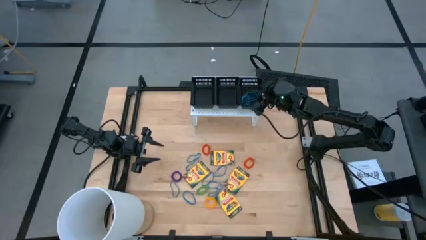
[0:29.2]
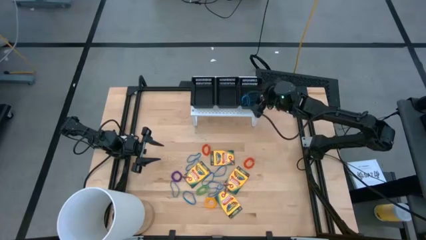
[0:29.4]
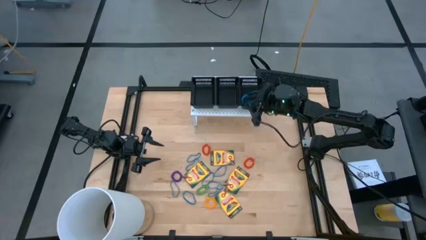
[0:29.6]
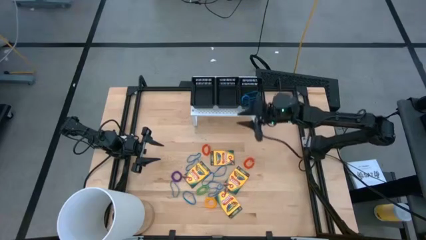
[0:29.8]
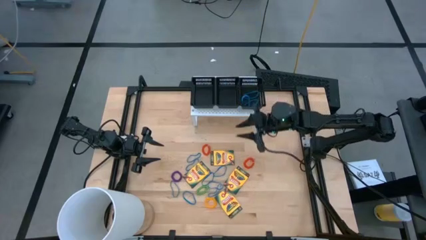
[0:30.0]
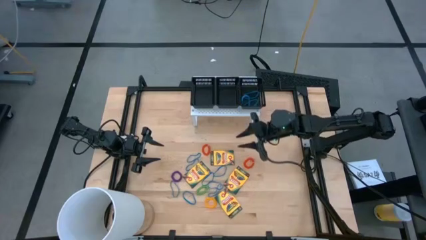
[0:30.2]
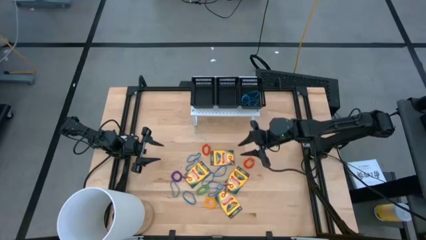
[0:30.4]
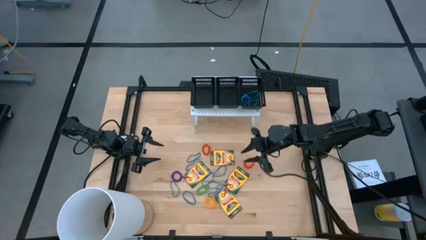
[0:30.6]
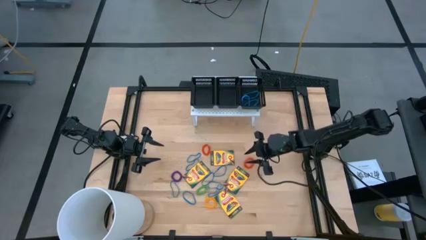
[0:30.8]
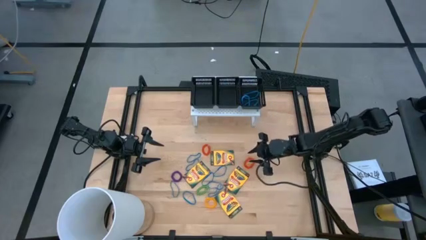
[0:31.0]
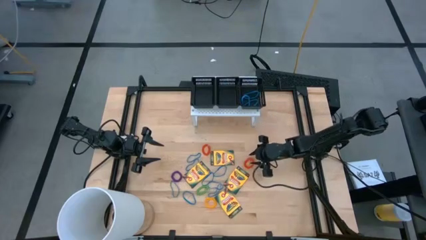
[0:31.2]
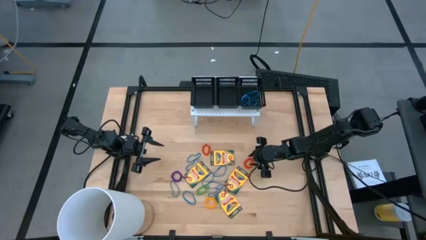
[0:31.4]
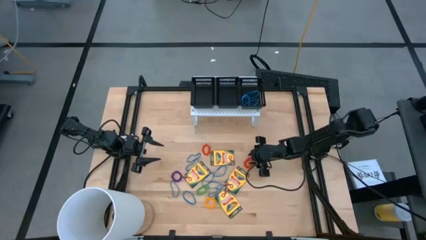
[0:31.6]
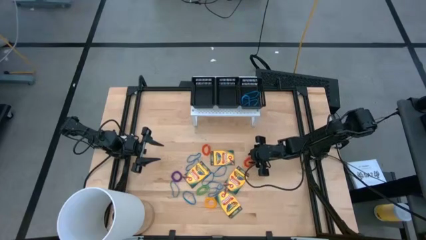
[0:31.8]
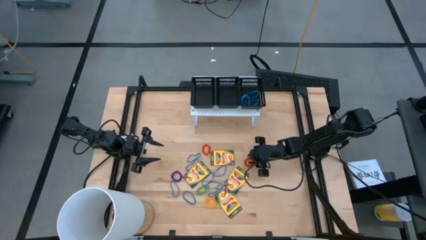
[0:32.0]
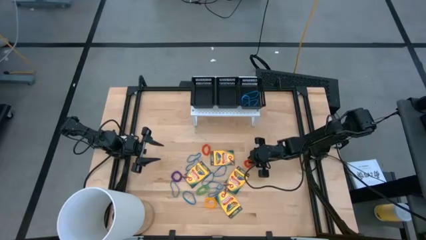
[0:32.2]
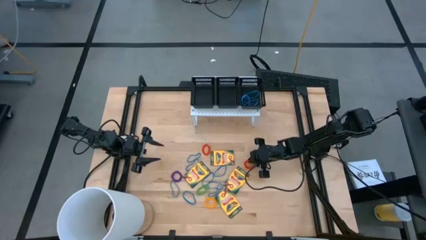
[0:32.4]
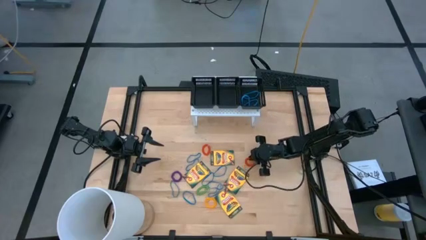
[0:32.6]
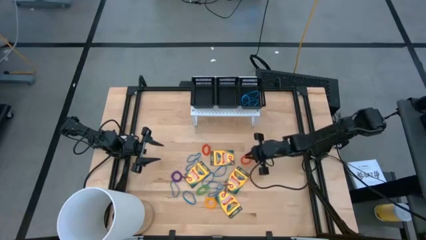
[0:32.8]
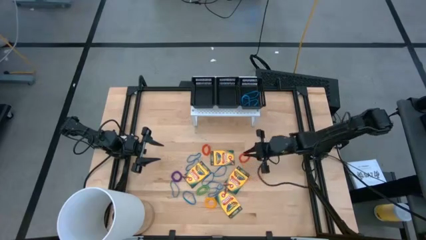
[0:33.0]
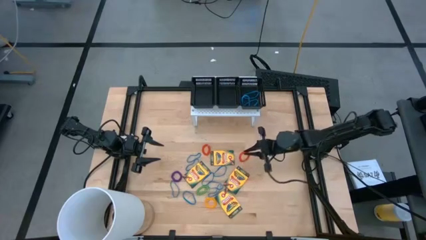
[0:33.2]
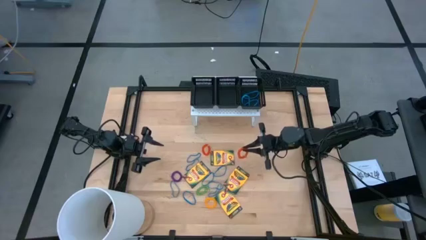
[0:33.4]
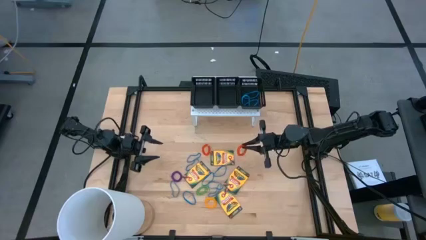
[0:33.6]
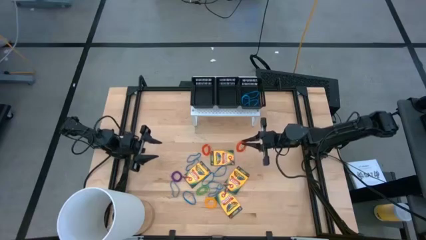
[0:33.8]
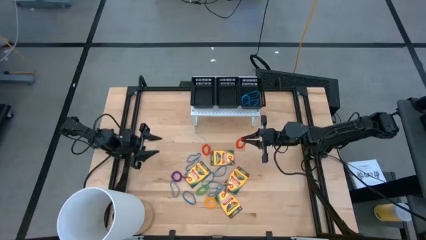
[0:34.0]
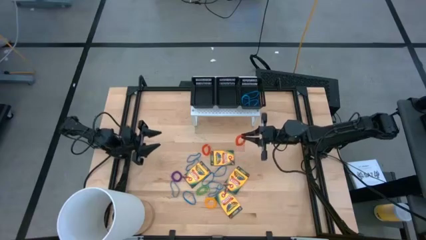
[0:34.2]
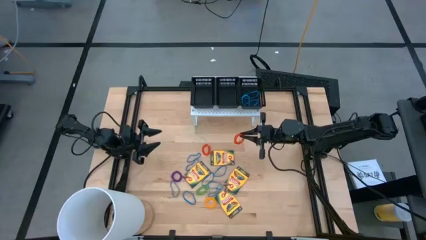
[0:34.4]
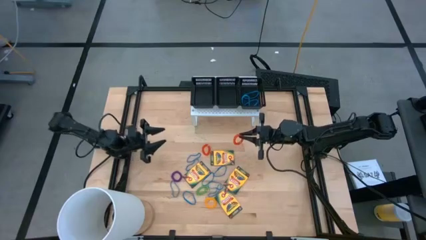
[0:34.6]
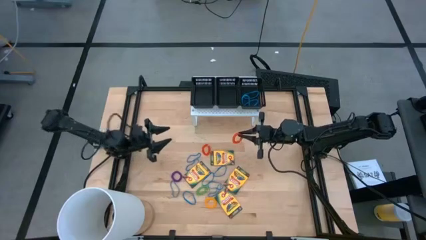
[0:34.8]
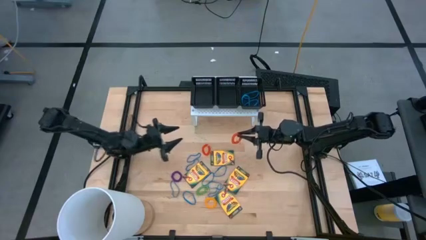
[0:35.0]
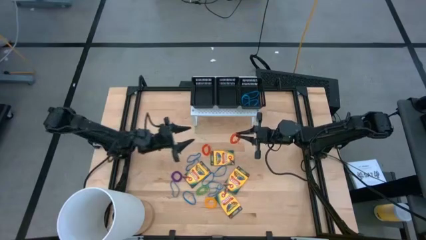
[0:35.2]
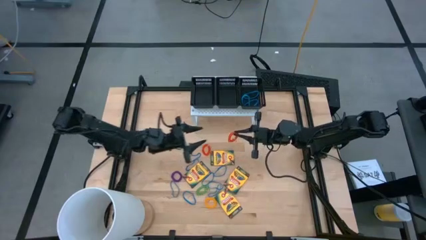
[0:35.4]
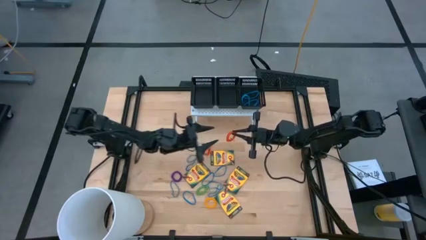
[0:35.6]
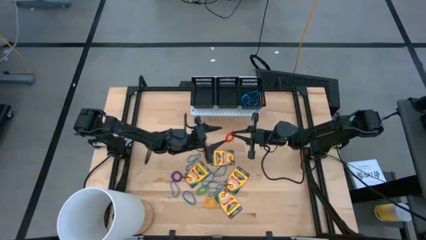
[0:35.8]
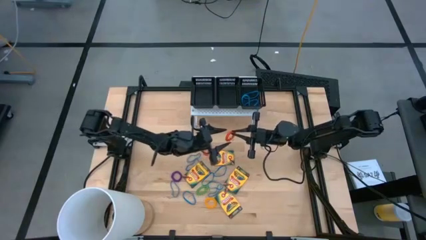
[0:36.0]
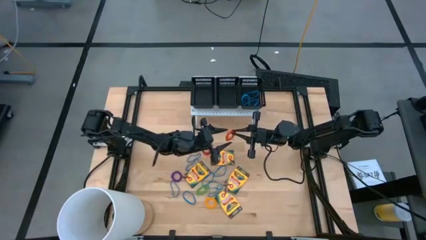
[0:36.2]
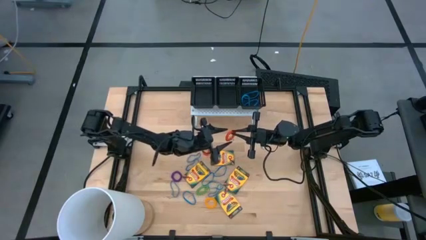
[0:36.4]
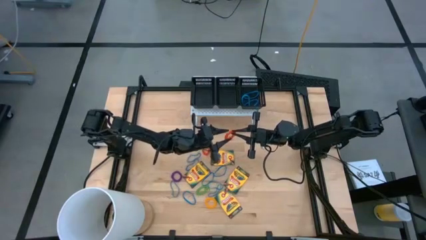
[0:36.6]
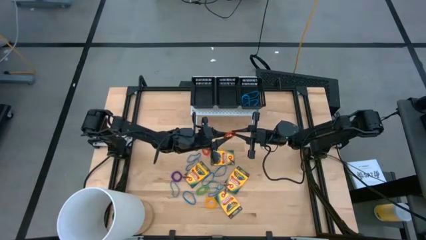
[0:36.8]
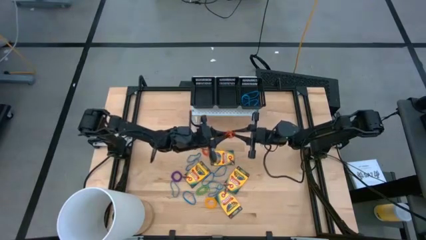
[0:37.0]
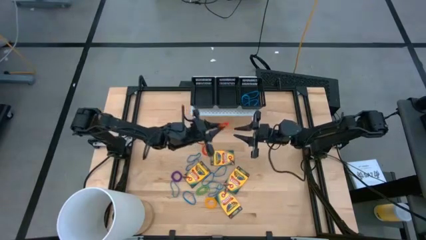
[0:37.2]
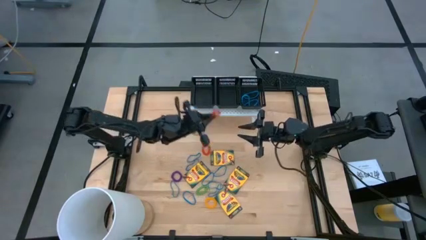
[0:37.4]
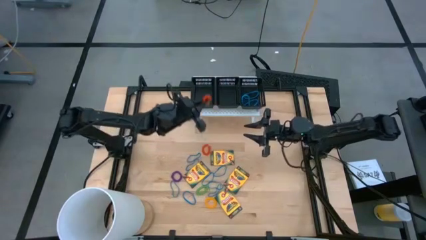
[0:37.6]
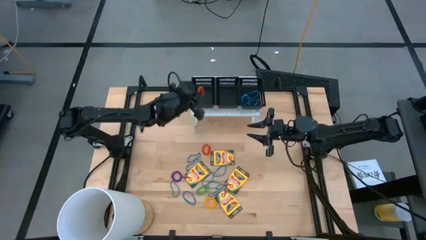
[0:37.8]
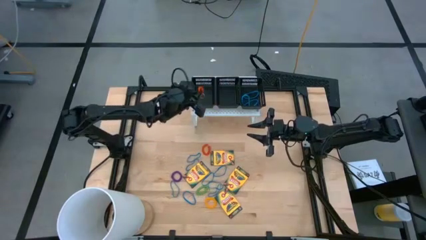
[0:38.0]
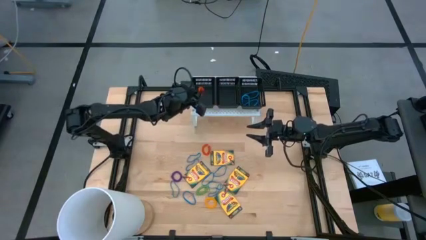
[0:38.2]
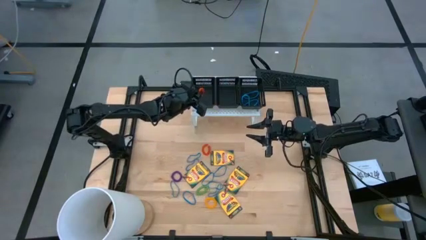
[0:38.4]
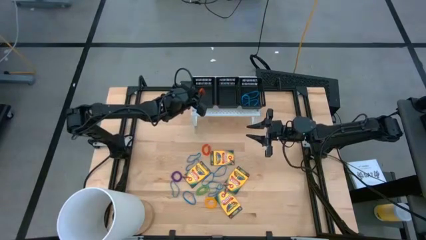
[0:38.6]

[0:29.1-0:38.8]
Task: Pick & Place Office Desk Supplies
Put the orange spring keychain into the left black bin on the shelf

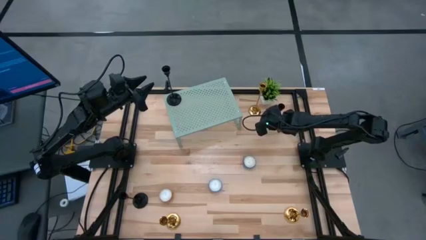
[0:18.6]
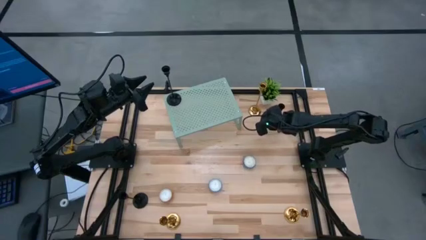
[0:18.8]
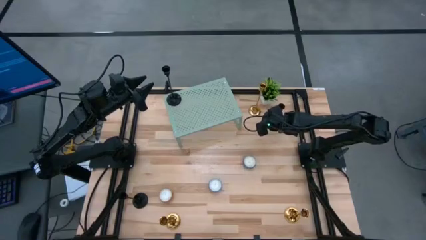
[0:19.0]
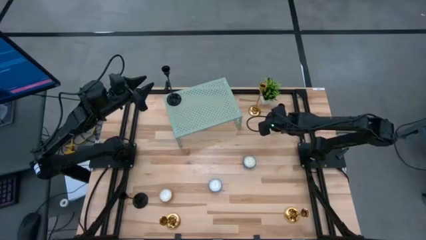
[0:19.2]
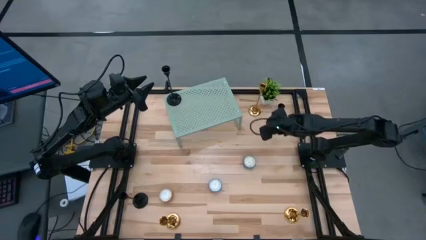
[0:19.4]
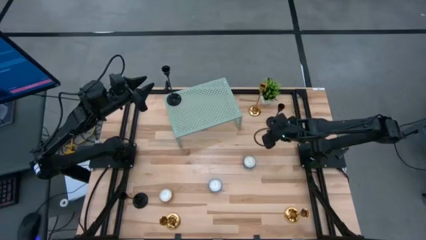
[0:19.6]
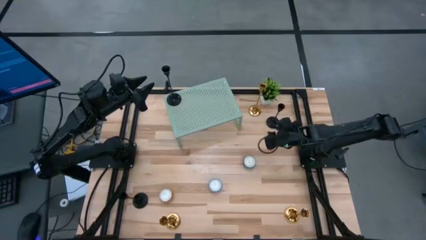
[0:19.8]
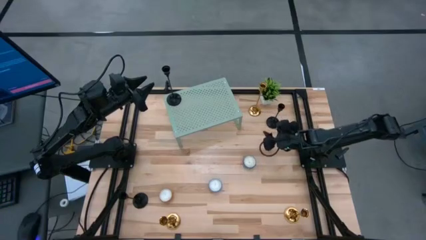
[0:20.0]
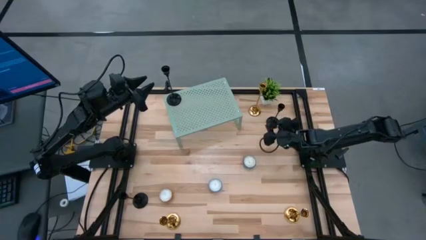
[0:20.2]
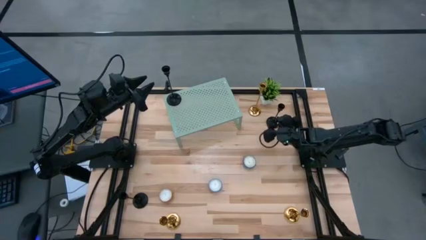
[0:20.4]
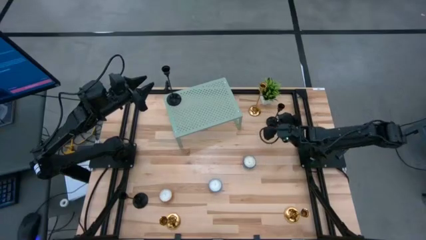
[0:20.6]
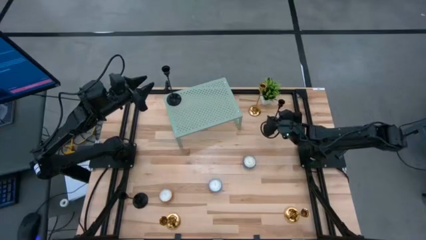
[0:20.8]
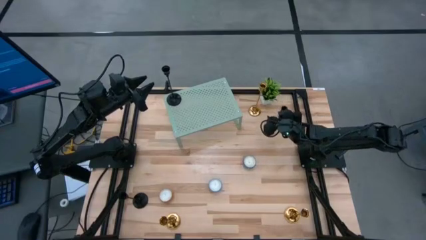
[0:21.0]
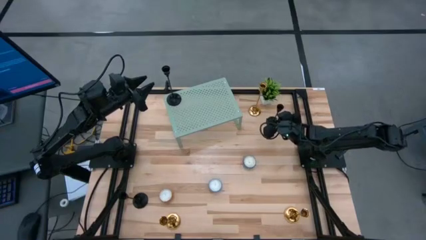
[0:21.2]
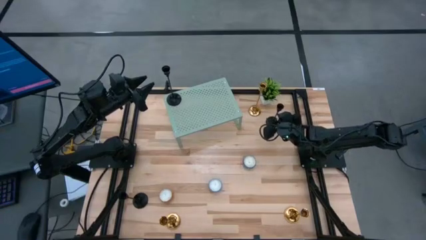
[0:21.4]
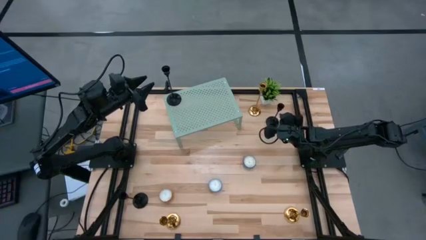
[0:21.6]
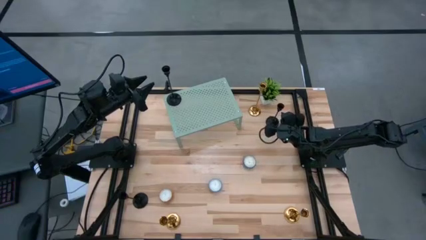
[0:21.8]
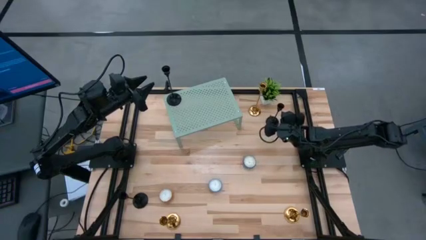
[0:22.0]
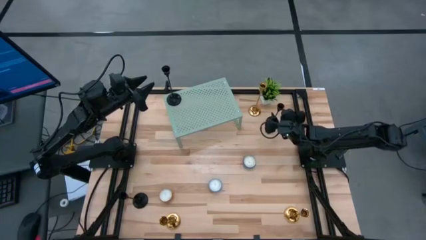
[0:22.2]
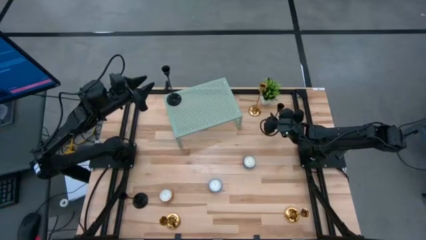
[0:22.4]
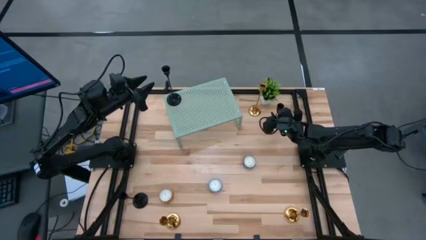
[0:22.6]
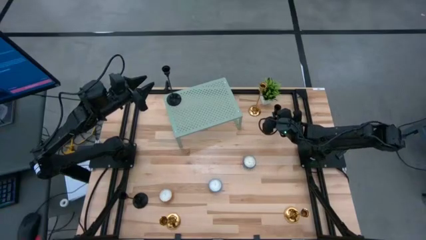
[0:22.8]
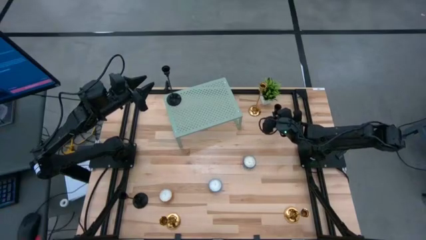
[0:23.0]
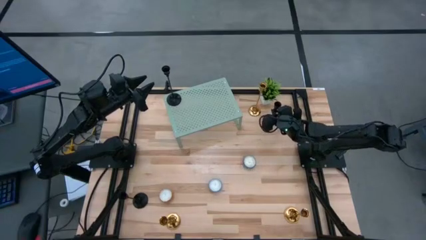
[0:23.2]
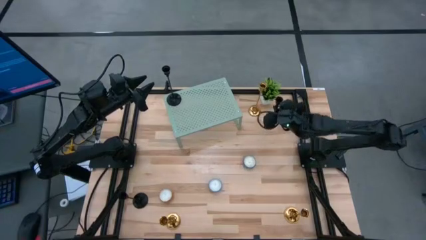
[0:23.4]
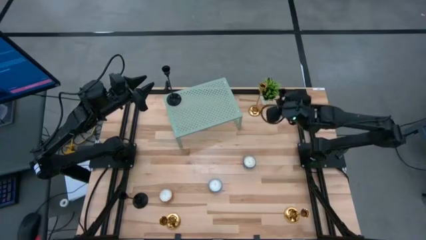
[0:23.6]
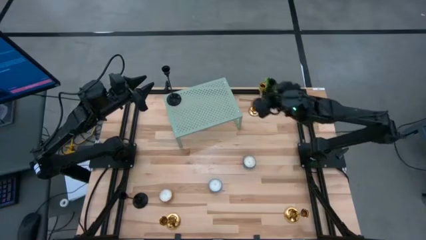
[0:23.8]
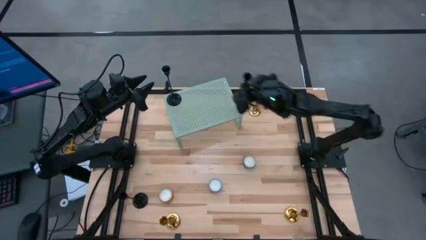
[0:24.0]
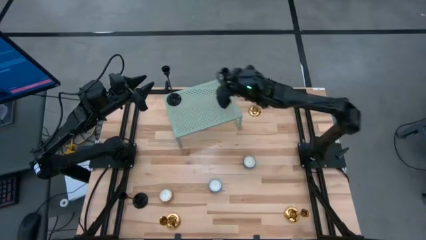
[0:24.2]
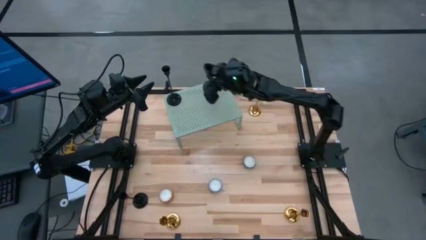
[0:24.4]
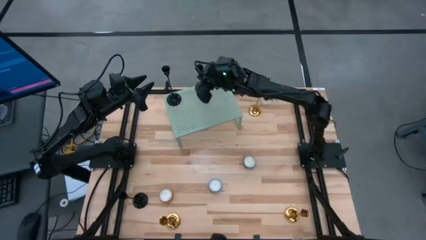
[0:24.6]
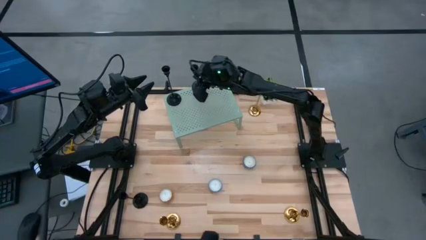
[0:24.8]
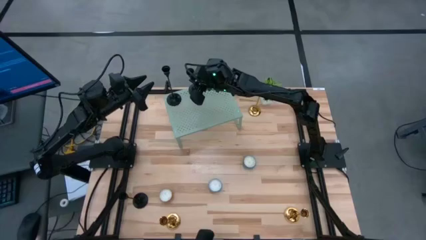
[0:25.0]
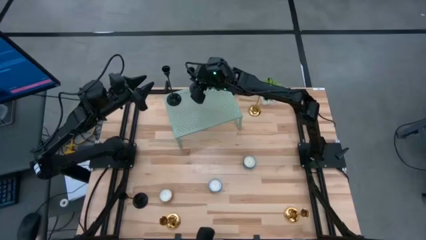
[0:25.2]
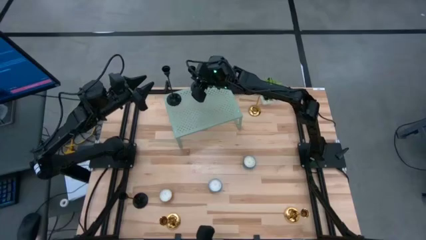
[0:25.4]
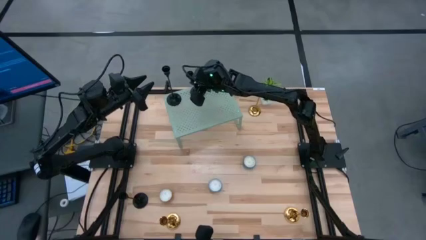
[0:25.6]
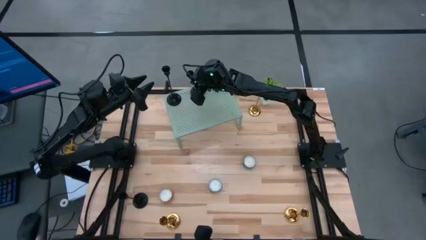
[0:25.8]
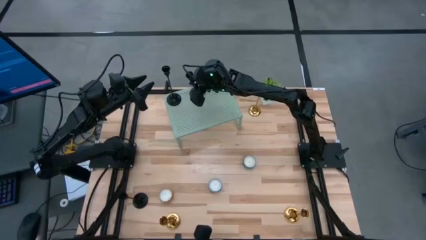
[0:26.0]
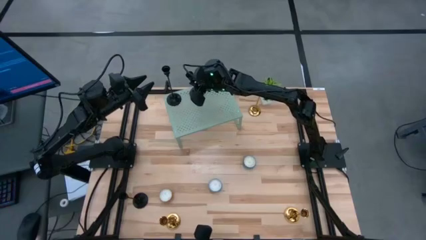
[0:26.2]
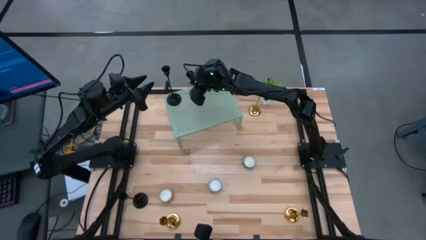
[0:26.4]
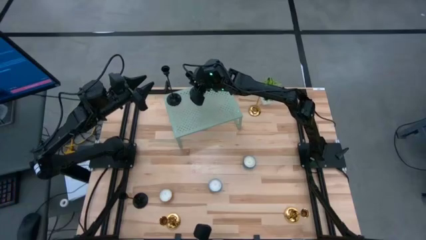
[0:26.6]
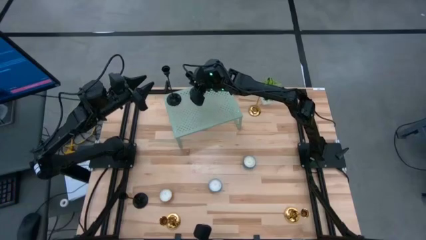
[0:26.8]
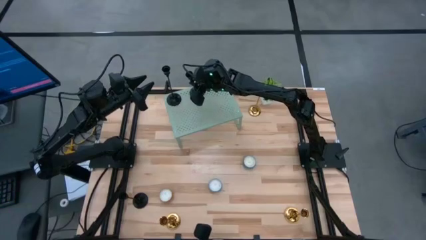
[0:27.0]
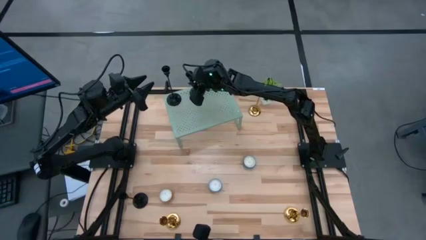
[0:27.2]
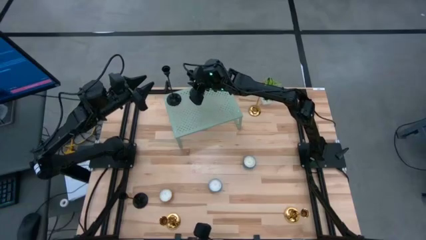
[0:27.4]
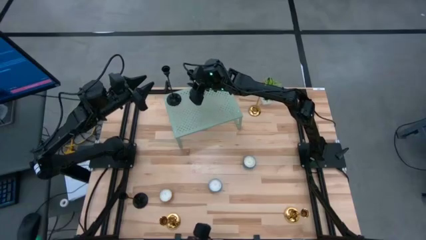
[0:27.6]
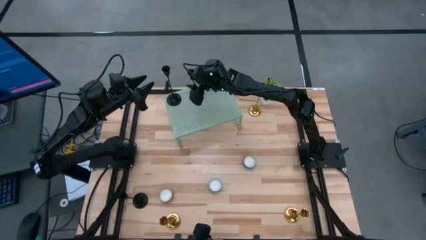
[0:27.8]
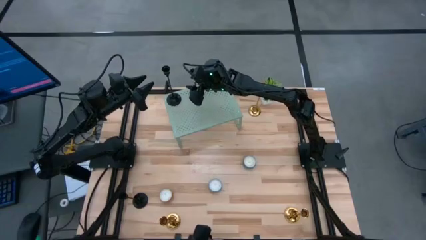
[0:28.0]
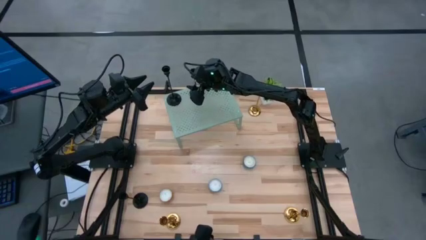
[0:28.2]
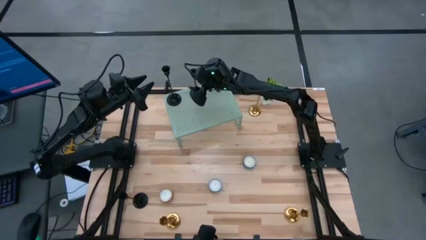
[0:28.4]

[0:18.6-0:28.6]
Task: Pick & Place candle stick holders
Put the top black candle holder on the shelf aligned with the other black candle holder
